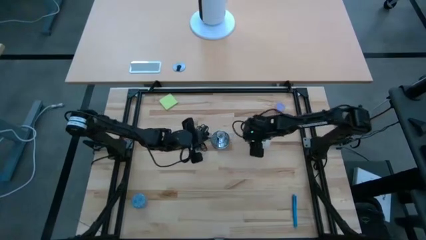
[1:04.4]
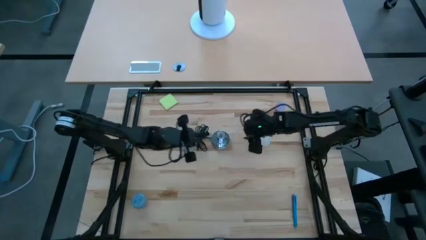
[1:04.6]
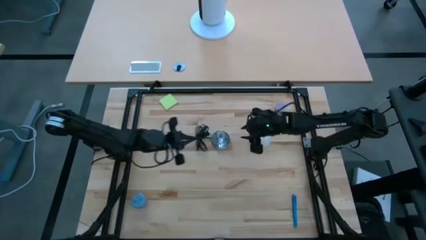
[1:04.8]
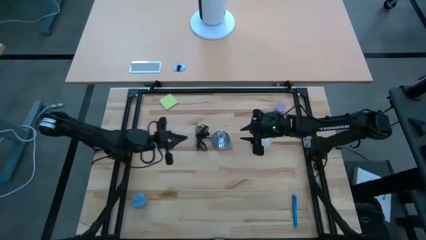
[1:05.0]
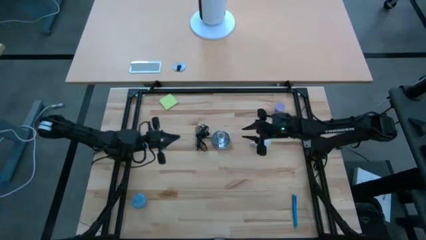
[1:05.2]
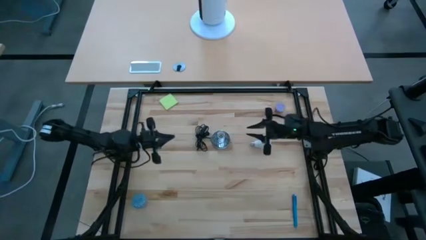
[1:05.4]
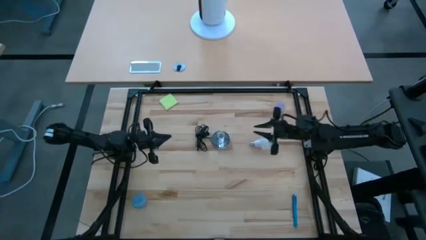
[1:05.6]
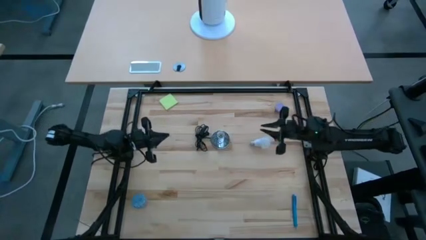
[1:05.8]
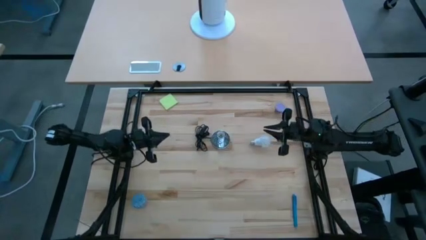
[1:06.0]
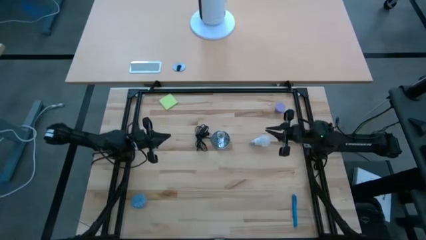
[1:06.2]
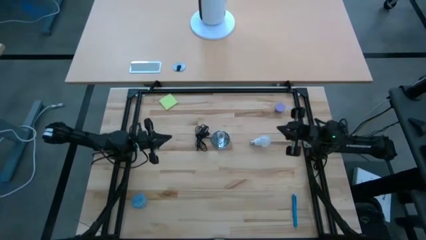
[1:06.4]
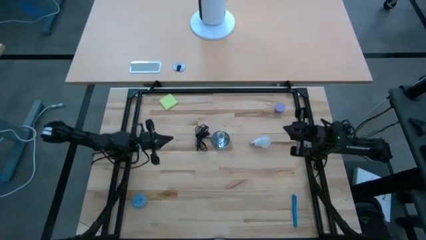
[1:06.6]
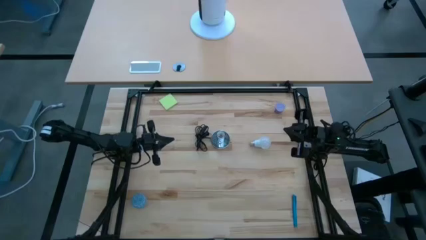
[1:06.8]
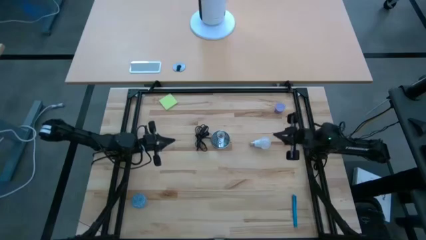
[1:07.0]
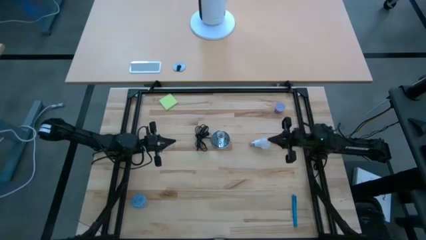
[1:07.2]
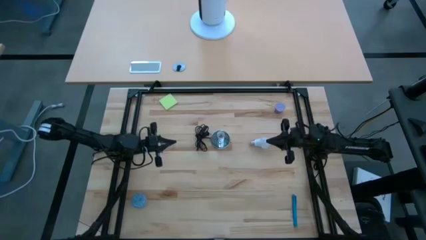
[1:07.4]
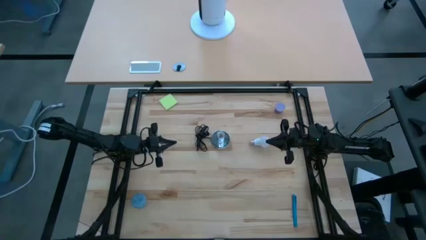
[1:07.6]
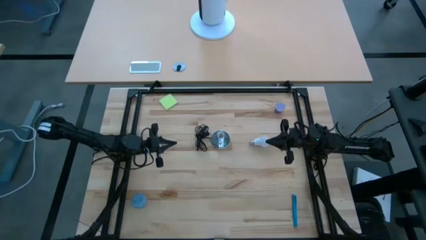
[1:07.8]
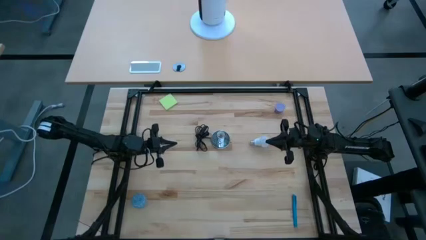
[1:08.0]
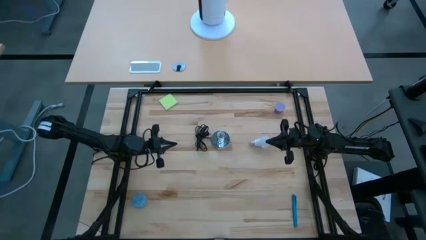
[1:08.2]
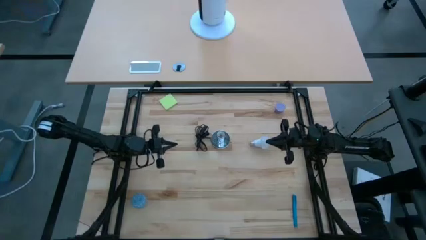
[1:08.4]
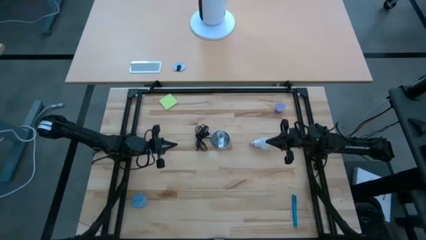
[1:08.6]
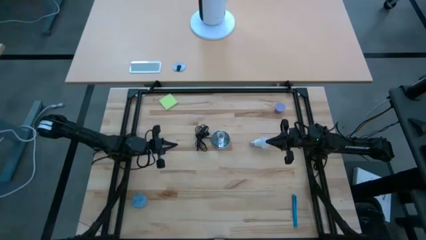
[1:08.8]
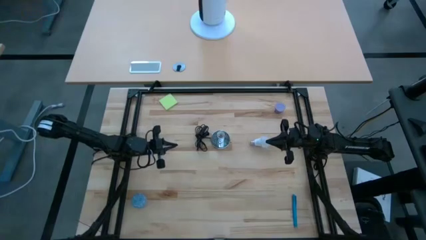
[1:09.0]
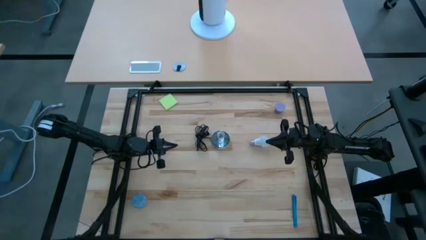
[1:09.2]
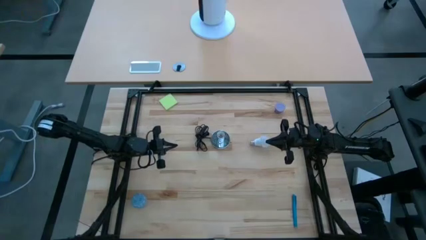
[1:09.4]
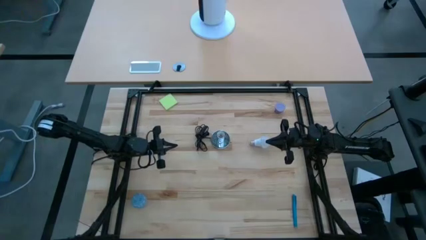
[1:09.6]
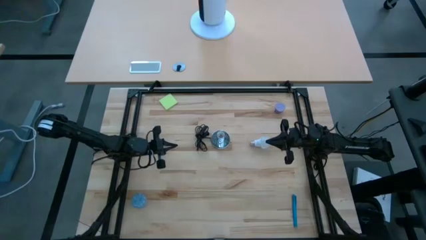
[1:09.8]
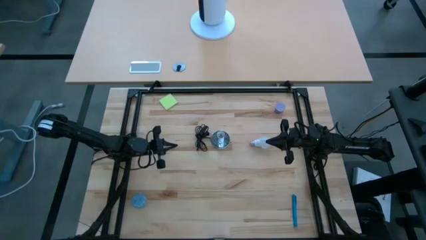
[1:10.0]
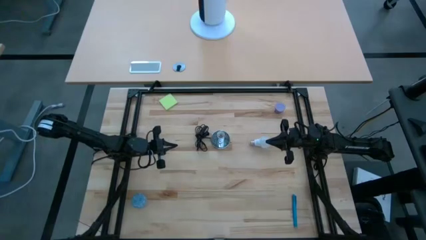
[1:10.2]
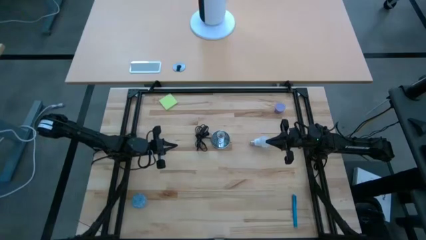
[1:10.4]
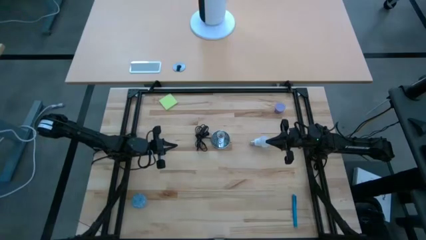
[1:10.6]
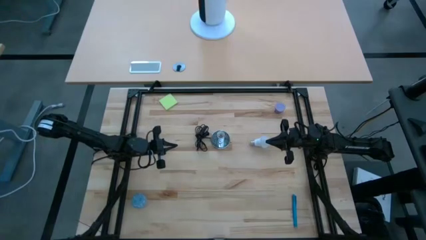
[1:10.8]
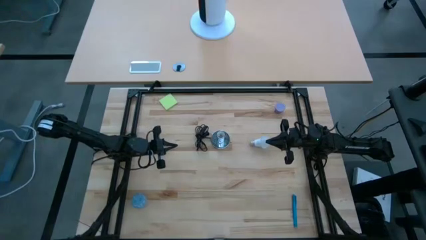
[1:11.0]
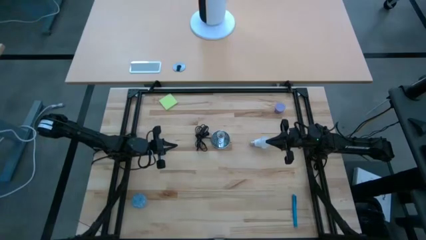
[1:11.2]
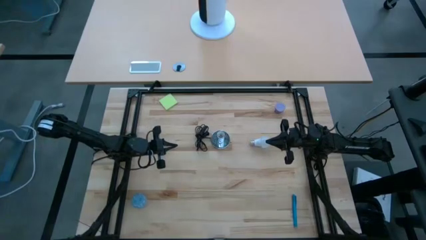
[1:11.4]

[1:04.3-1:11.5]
Task: Screw lightbulb
Return to Home Position

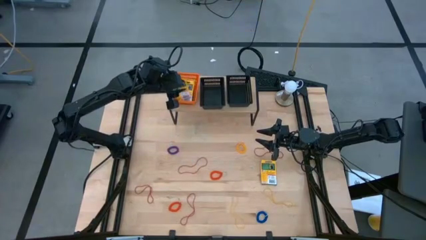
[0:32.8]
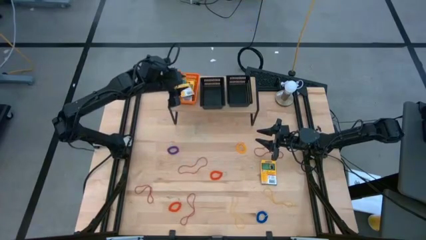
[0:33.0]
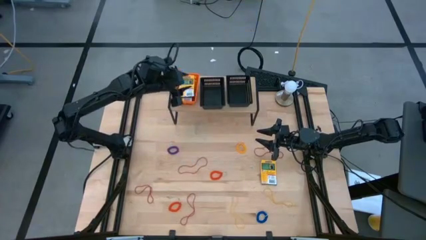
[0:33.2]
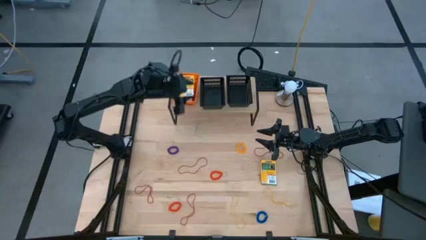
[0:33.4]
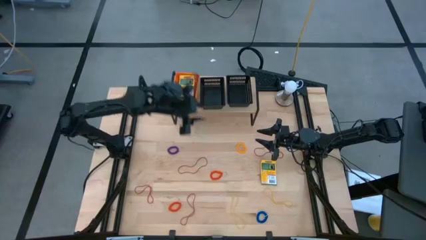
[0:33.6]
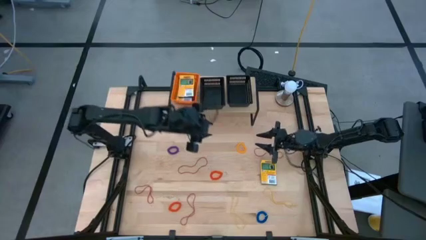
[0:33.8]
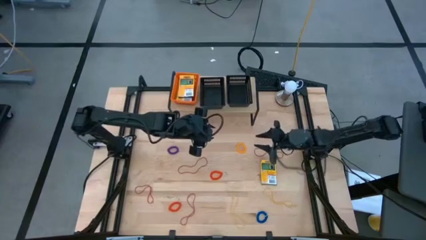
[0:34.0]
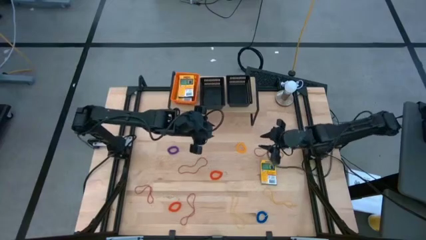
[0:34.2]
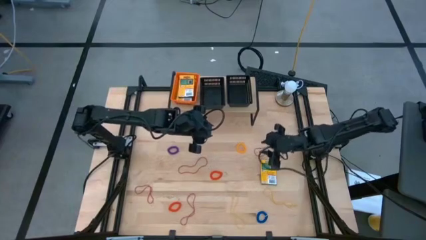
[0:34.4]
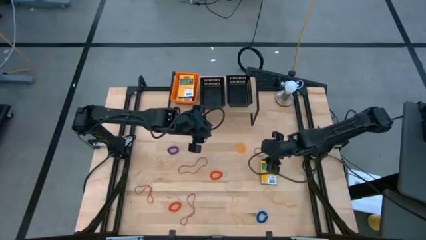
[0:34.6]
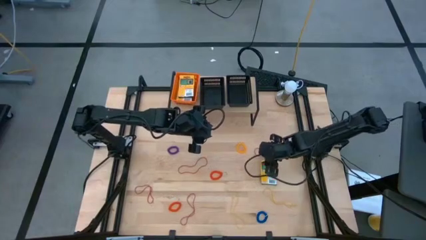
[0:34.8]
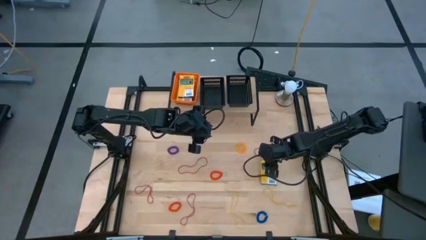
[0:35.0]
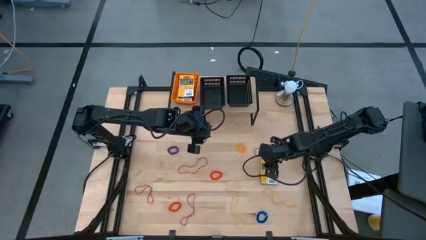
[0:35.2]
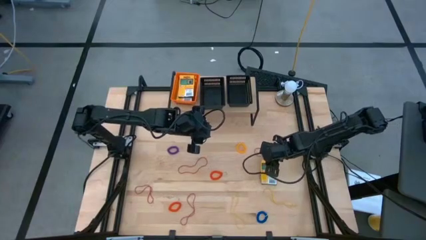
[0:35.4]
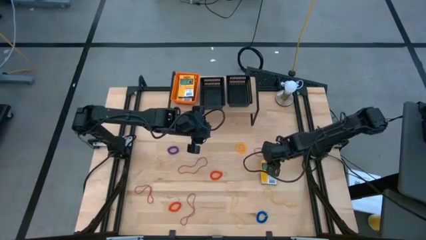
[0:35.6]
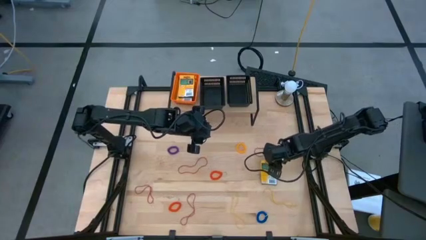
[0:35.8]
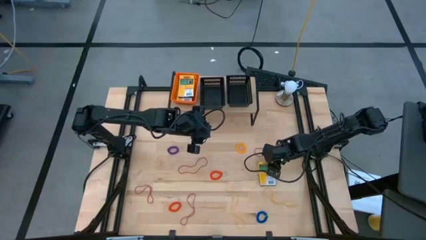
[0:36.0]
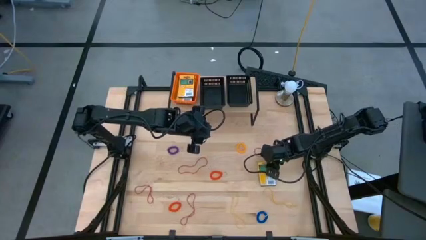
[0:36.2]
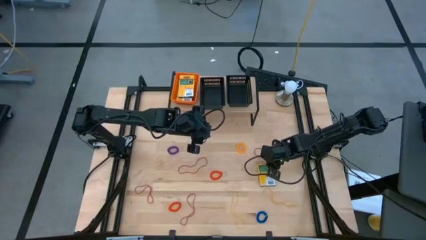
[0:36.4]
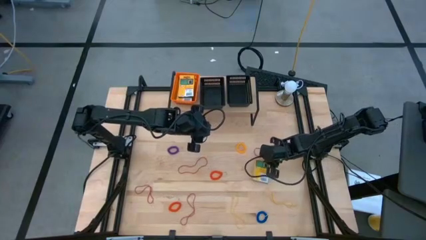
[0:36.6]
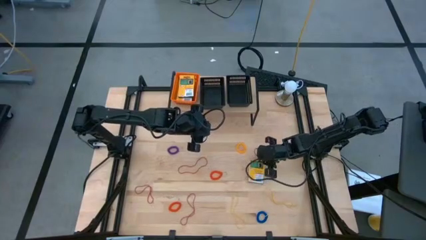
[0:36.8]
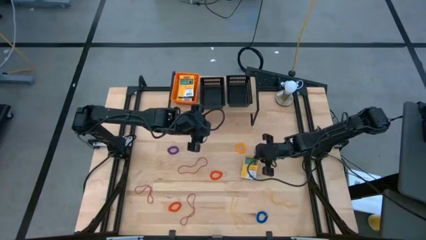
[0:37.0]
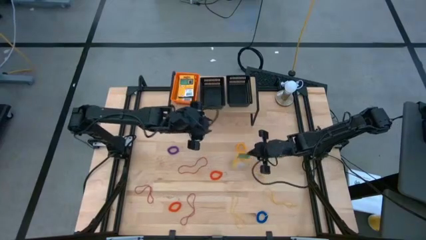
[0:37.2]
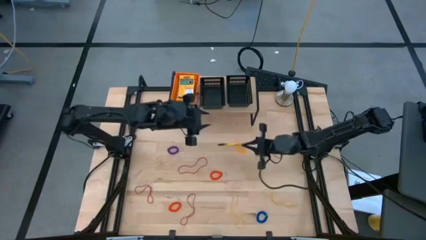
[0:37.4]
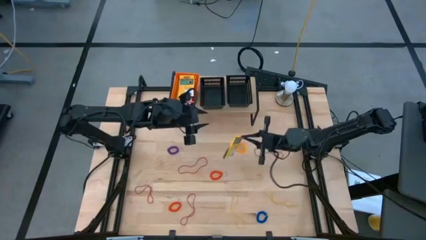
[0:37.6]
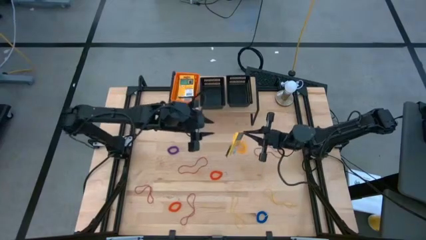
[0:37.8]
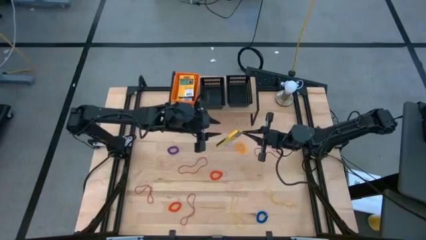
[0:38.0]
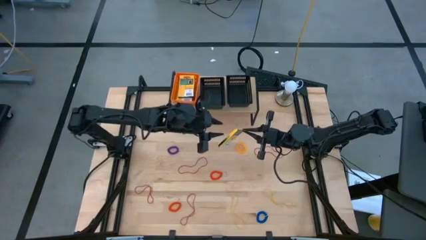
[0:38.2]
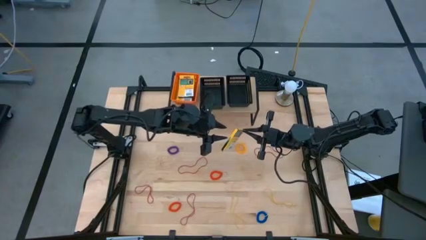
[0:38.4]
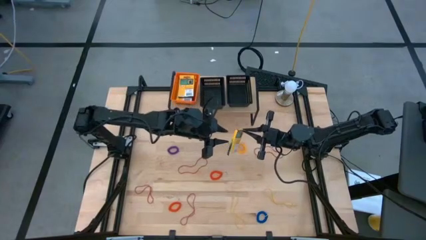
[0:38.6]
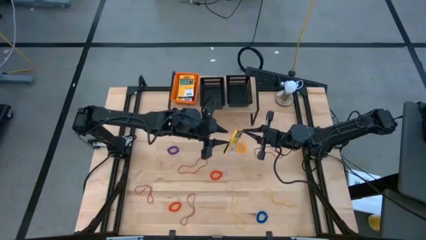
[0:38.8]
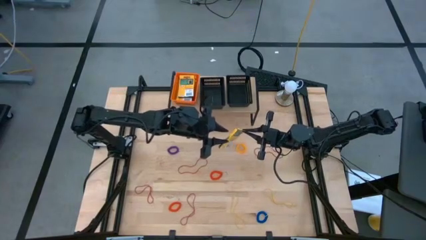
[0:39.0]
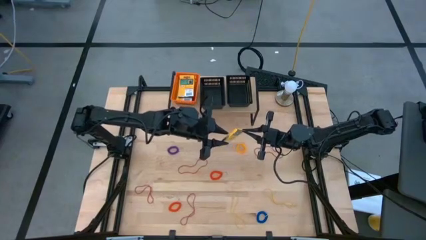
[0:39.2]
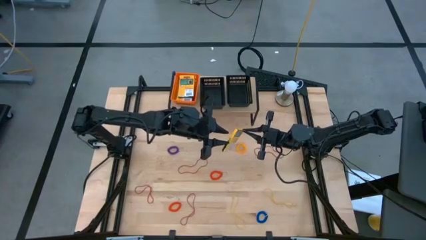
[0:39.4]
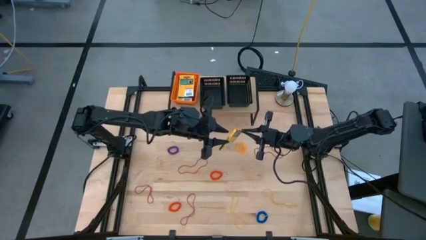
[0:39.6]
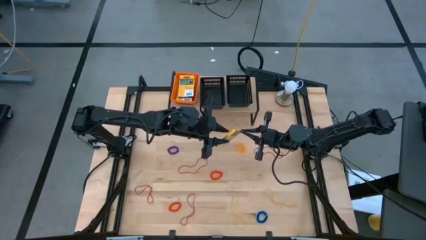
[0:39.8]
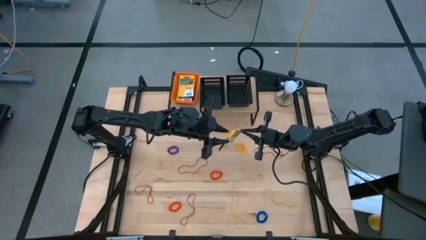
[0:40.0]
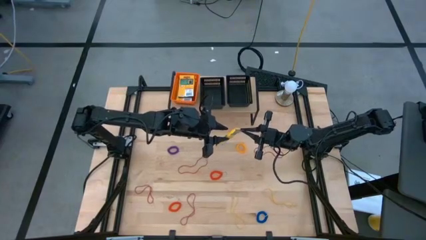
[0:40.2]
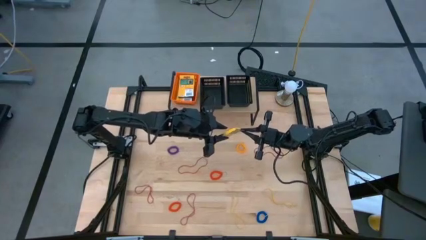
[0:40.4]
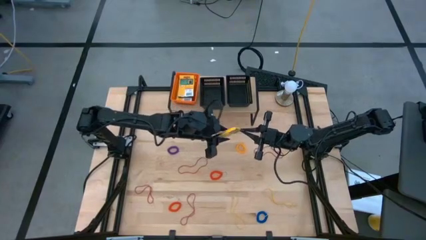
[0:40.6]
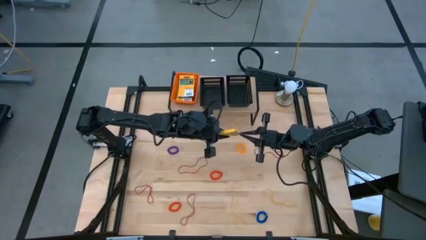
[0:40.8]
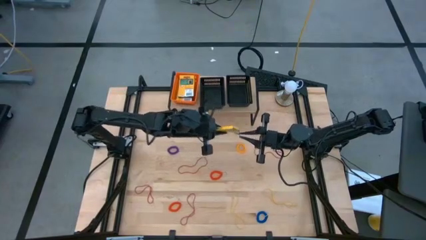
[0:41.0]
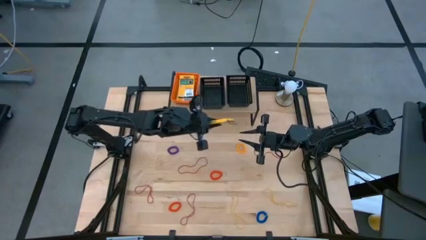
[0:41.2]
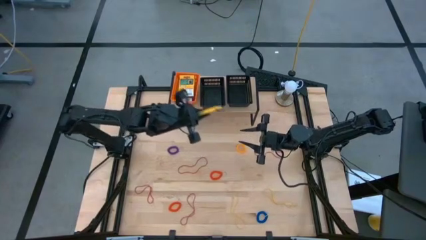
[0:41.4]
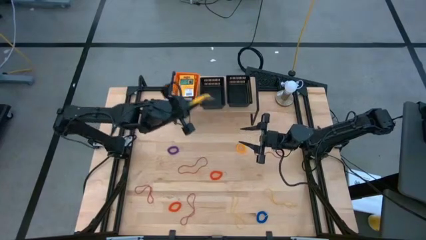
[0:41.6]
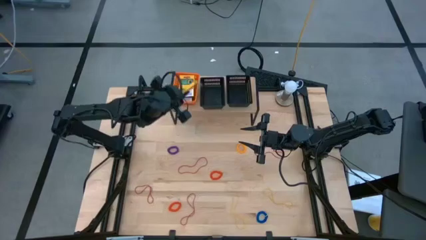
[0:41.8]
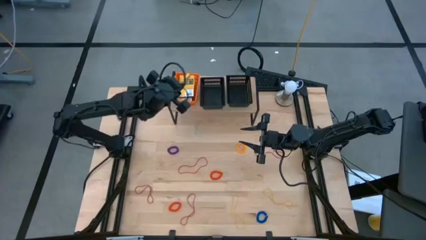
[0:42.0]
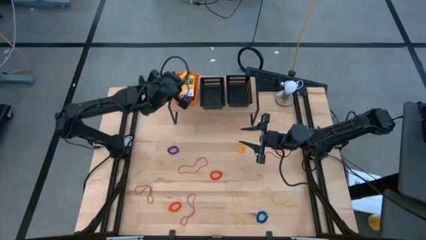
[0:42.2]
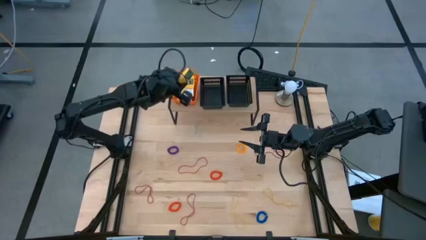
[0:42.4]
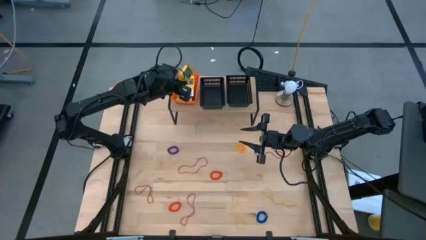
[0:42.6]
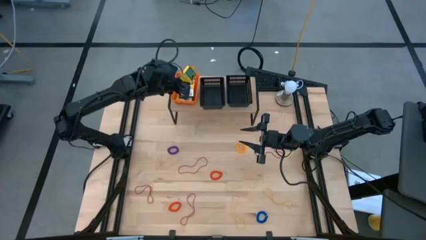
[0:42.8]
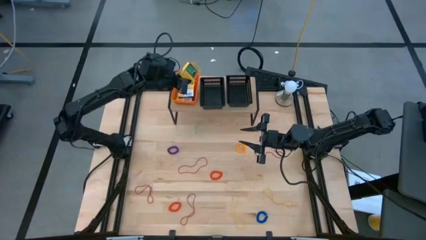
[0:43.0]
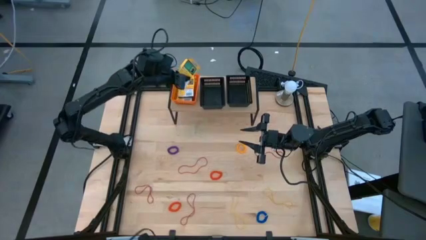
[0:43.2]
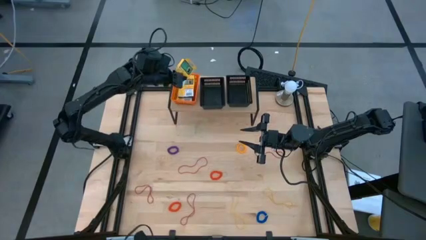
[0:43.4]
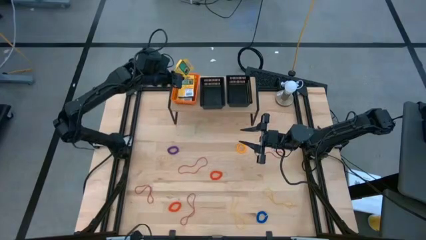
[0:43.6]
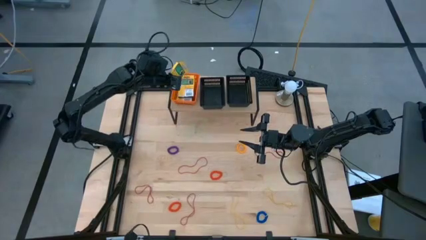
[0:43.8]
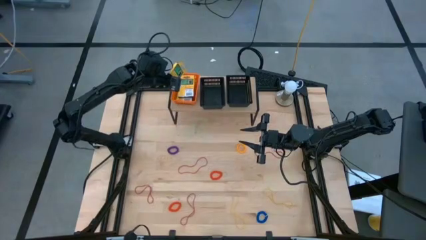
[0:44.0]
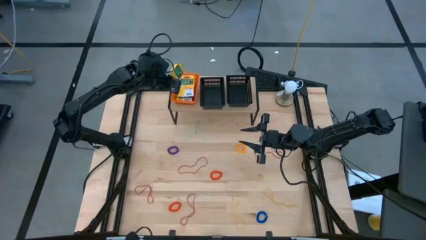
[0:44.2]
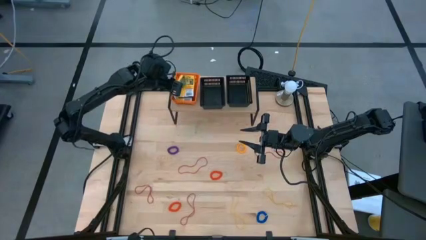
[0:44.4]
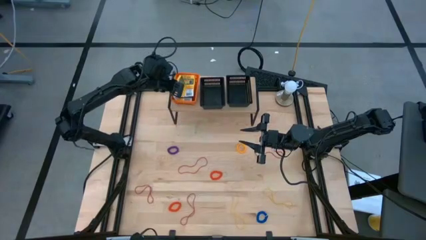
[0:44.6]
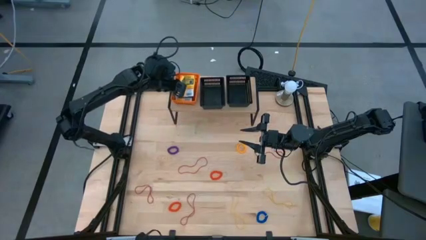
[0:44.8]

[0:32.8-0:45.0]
Task: Pick & Place Office Desk Supplies
Put the crayon box into the orange basket on the shelf
